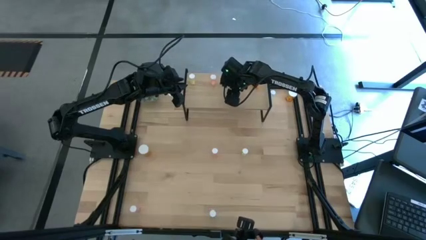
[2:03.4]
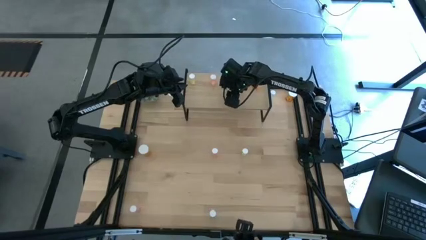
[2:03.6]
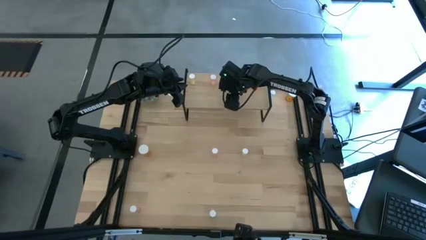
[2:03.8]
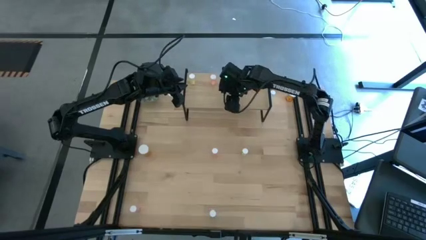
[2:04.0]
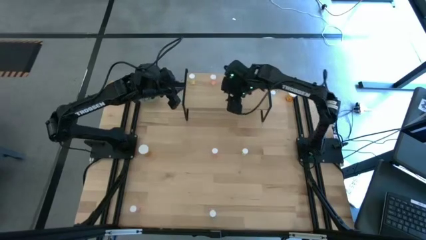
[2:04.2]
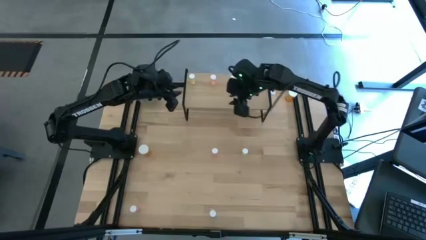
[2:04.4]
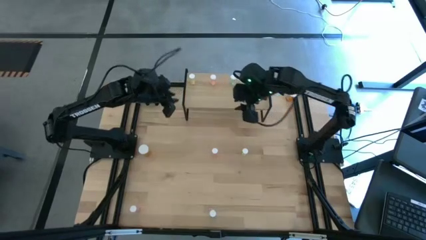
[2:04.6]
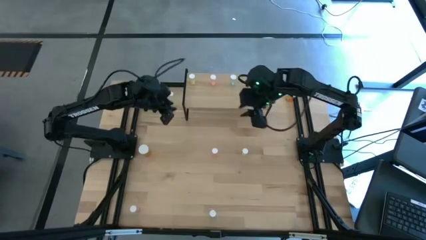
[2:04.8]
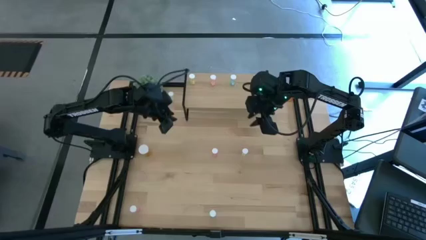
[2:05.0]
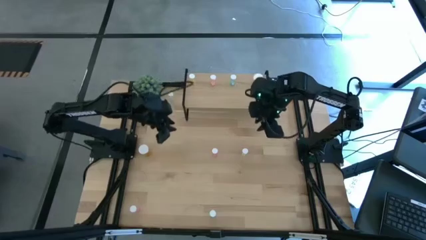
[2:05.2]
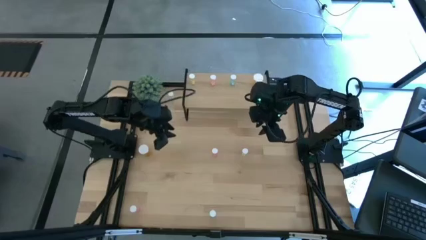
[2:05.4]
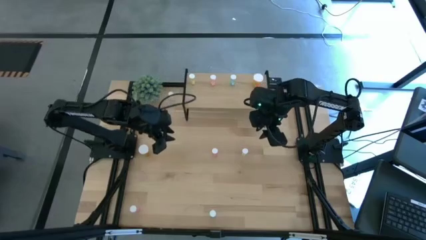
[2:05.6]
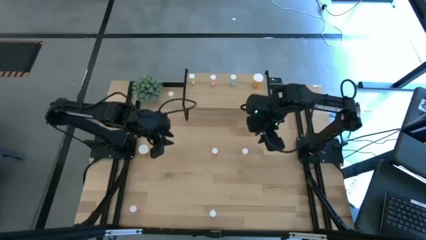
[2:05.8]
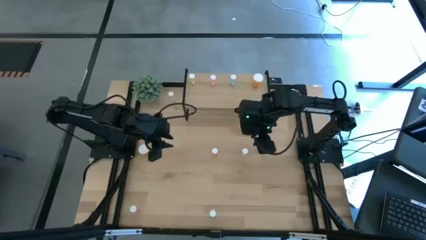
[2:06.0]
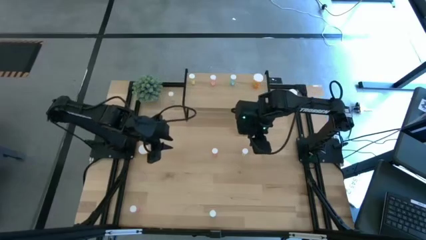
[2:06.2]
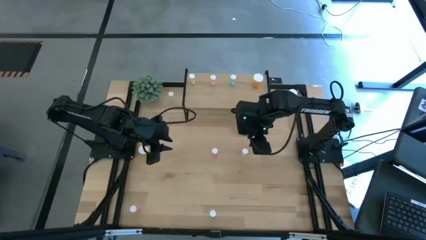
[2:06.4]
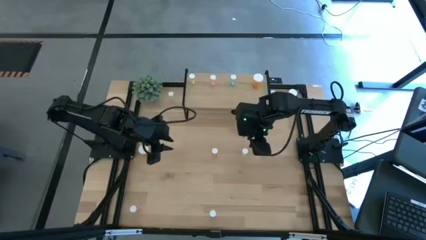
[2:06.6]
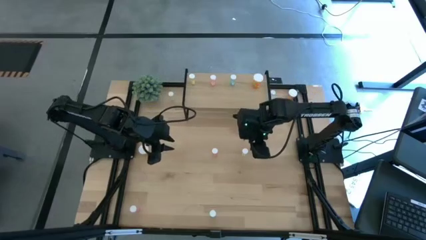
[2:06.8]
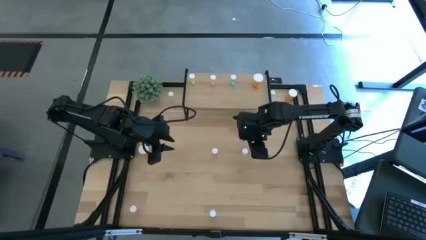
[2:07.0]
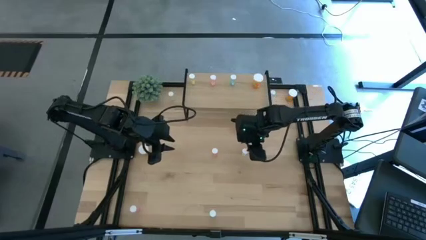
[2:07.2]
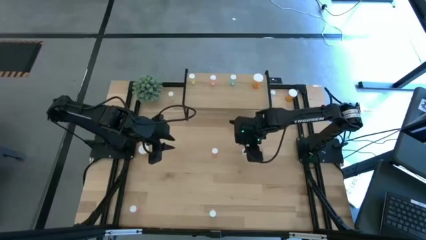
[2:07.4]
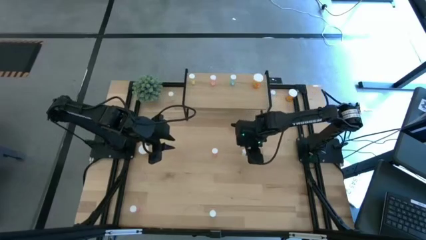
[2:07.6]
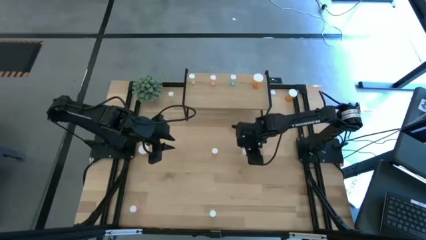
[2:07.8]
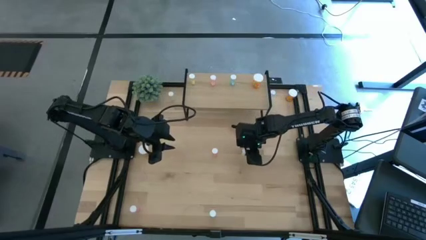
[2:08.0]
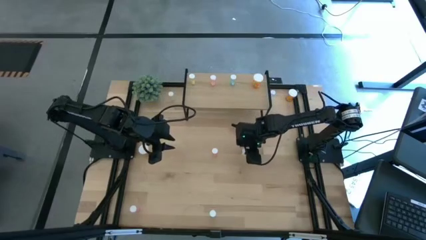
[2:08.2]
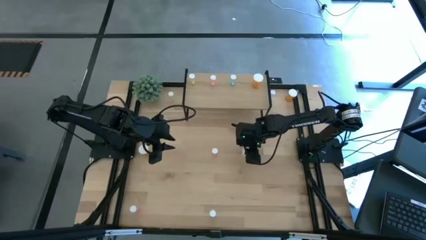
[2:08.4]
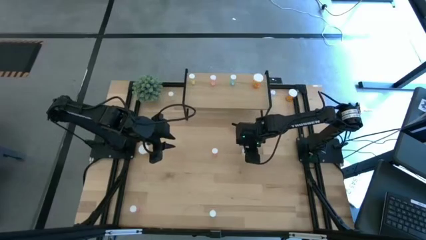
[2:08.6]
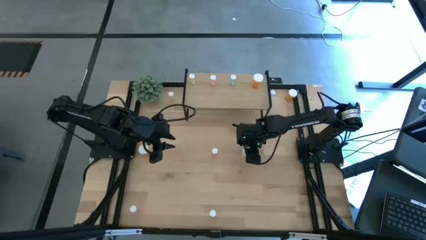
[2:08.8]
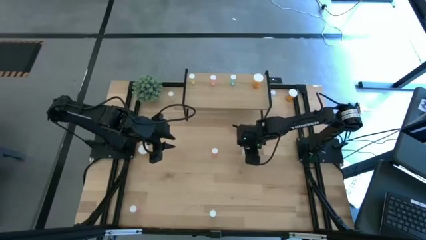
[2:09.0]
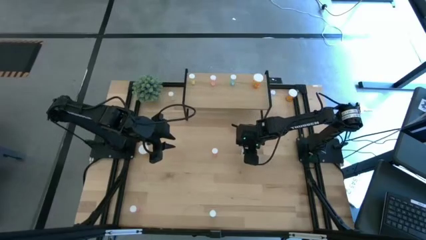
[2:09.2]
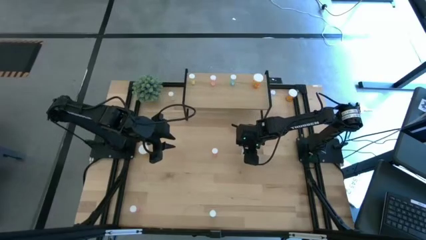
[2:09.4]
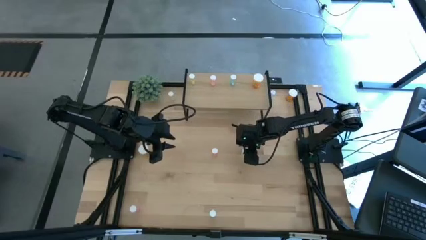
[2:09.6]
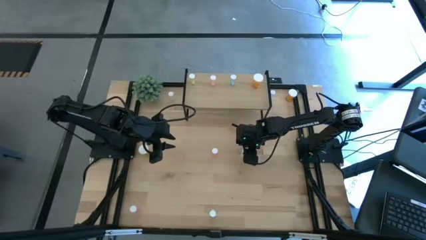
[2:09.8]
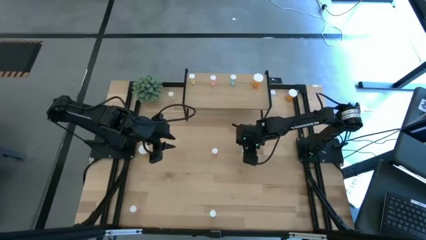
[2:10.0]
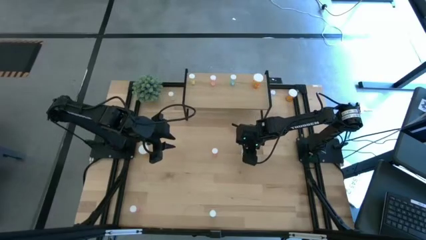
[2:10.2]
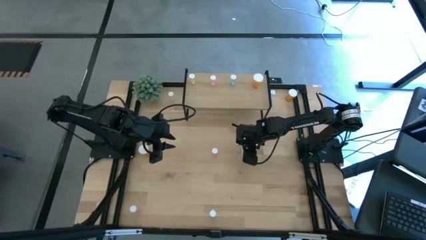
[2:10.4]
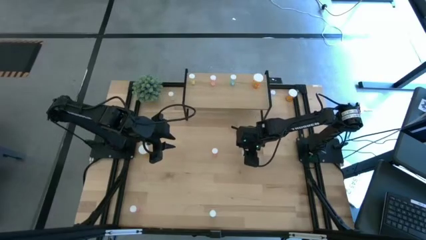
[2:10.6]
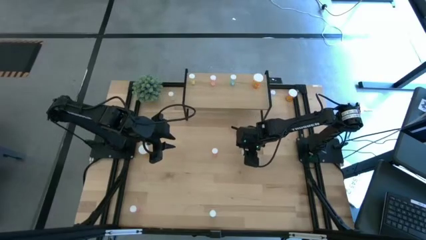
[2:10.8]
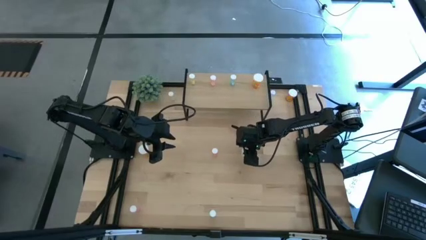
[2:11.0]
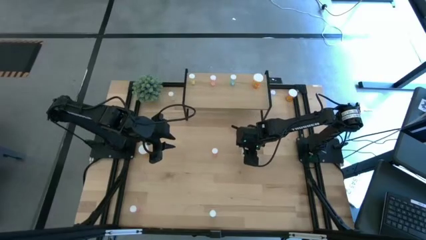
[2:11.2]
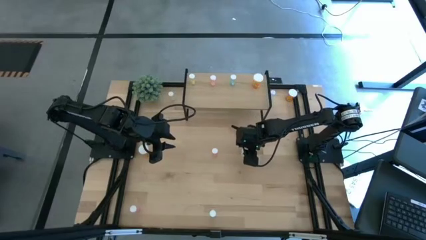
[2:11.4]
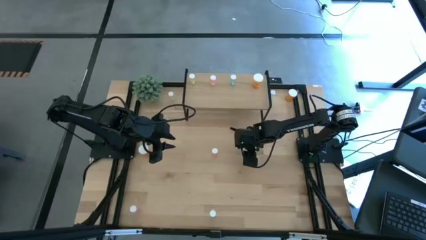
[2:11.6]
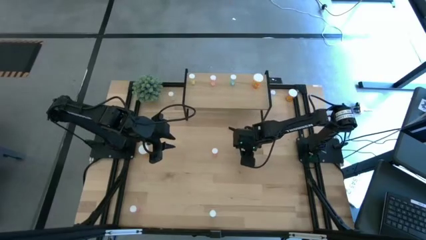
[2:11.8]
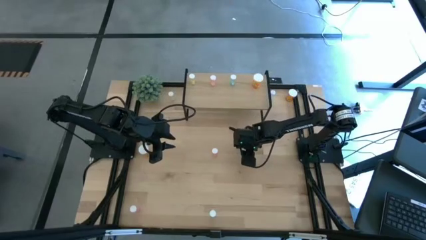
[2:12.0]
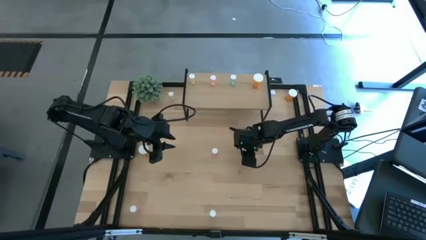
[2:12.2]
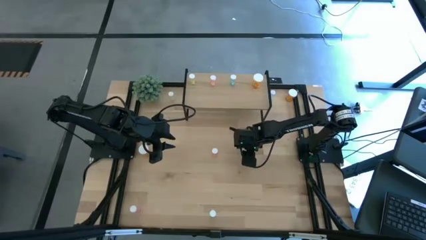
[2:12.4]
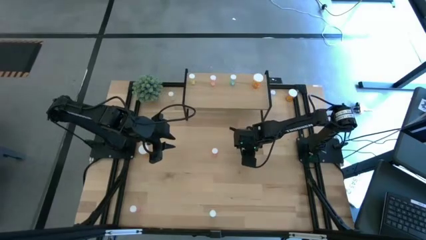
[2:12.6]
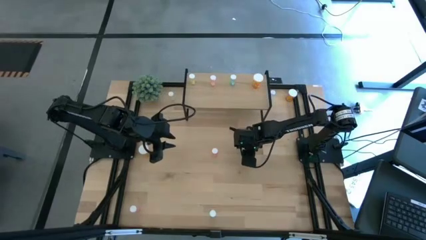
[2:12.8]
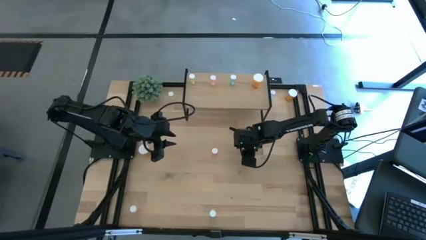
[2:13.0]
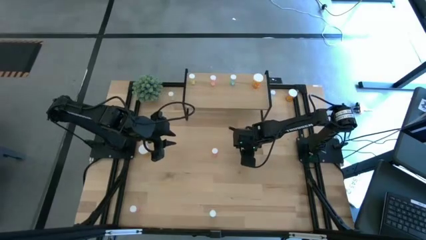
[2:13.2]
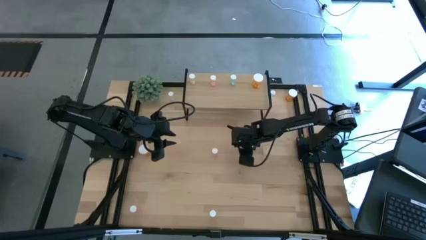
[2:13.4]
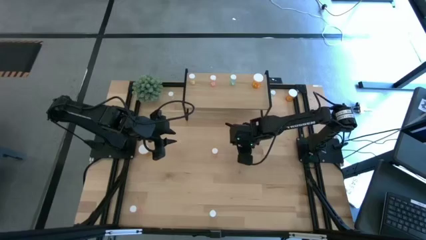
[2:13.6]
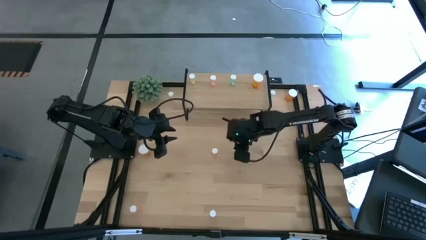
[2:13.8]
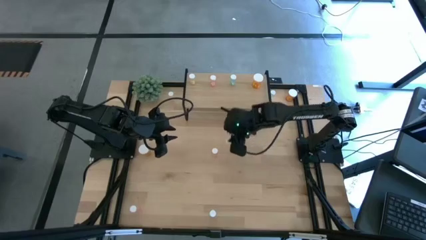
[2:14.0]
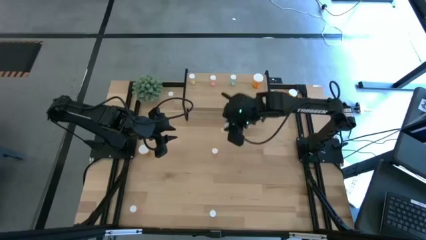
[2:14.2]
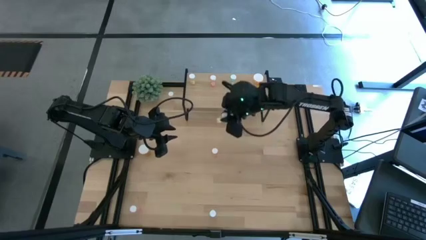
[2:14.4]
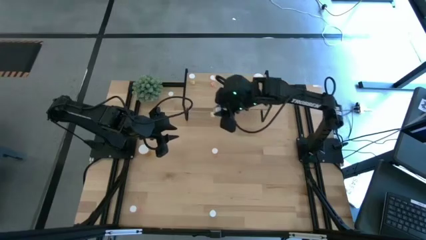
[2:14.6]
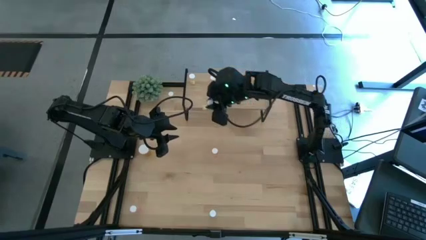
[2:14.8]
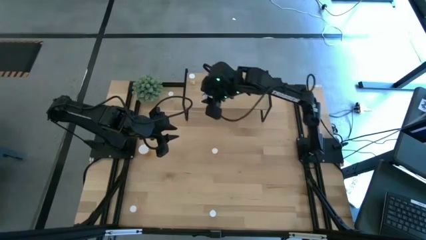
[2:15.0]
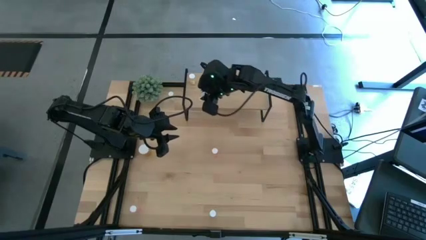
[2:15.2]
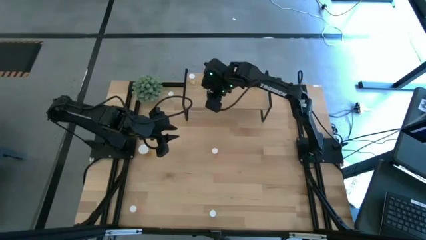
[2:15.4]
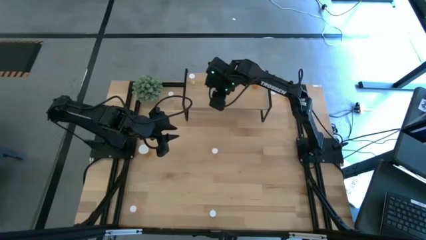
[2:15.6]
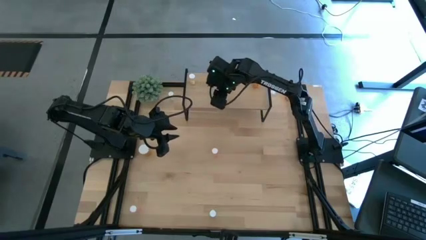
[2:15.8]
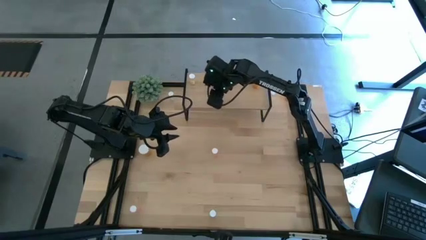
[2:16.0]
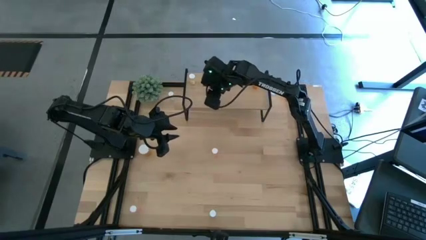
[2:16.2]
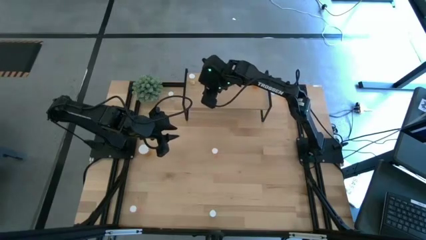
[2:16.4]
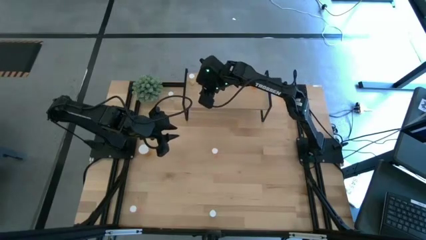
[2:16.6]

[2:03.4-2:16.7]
Task: Pick and place medicine bottles onto shelf by color
Put the bottom yellow pill bottle on the shelf aligned with the other yellow pill bottle

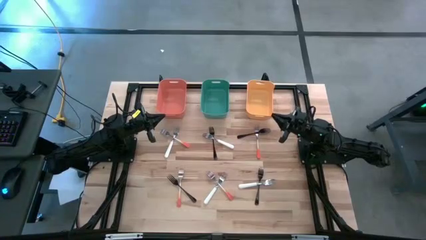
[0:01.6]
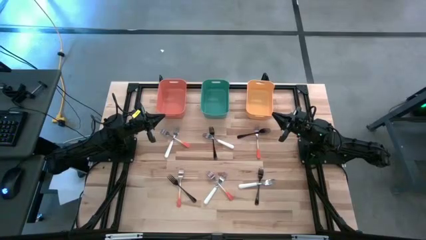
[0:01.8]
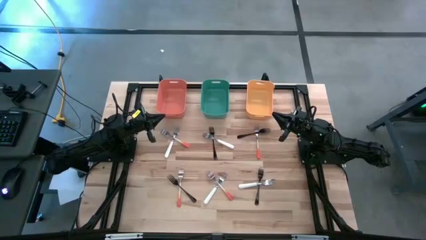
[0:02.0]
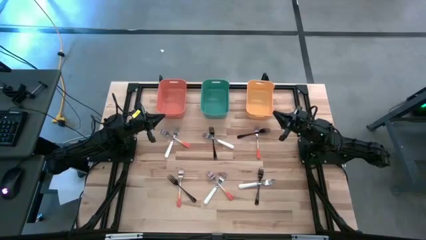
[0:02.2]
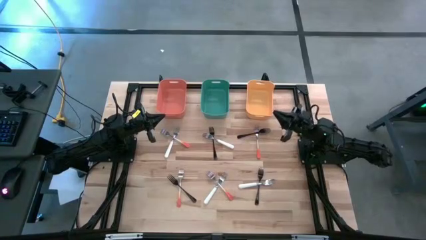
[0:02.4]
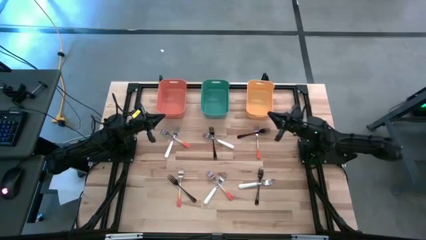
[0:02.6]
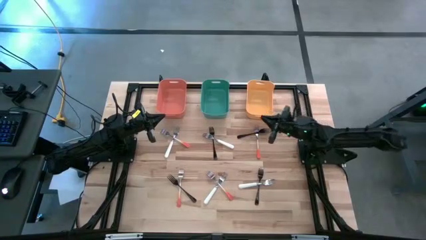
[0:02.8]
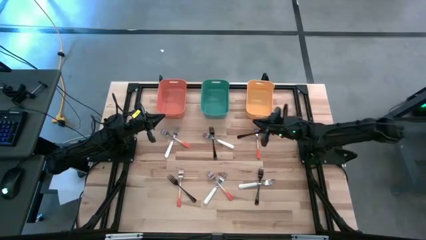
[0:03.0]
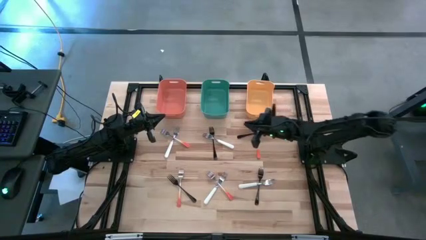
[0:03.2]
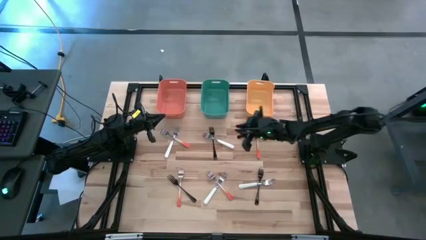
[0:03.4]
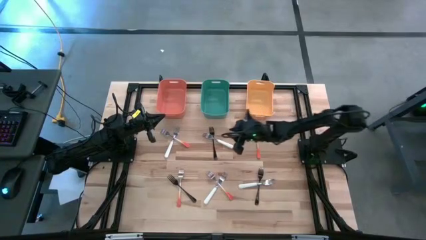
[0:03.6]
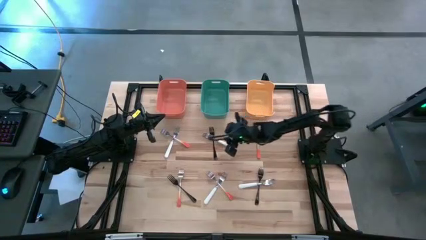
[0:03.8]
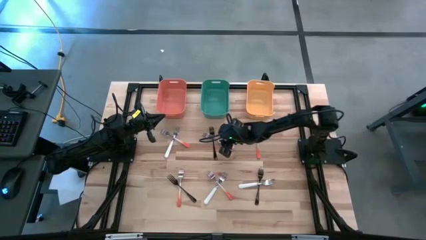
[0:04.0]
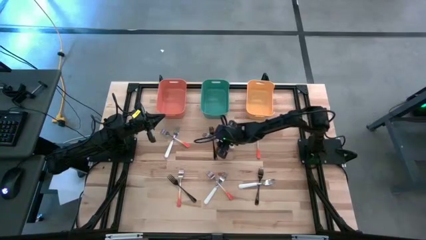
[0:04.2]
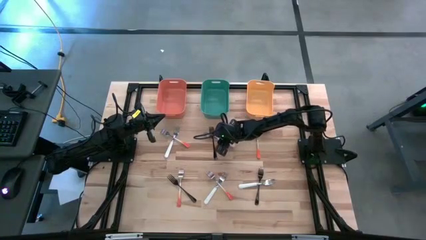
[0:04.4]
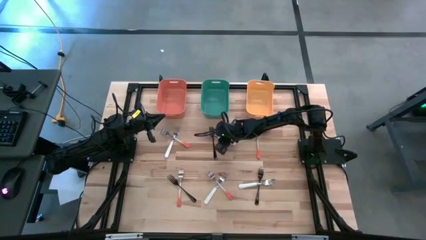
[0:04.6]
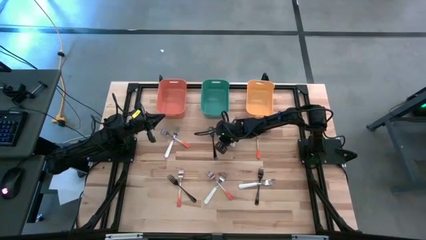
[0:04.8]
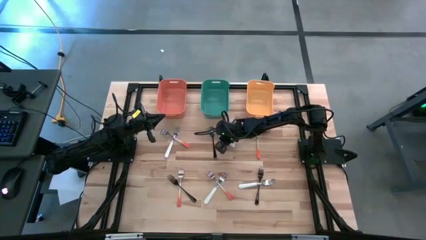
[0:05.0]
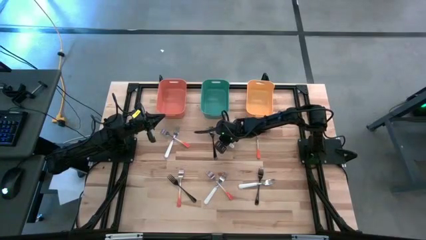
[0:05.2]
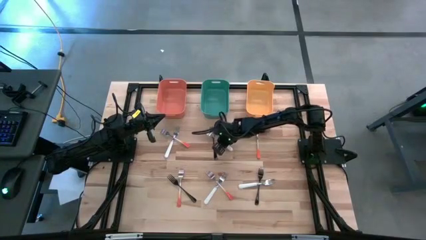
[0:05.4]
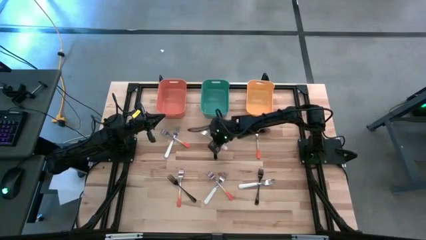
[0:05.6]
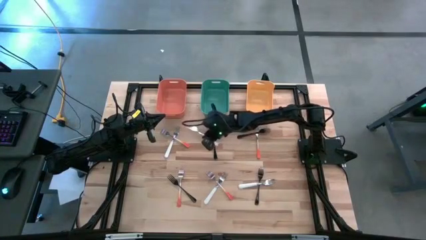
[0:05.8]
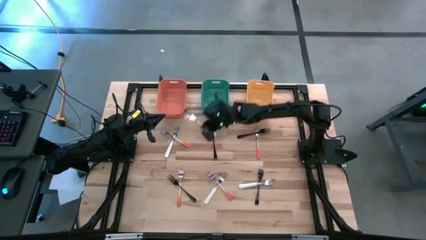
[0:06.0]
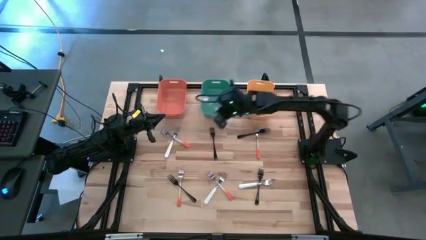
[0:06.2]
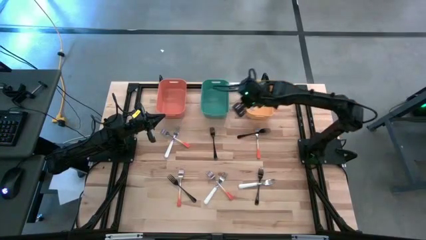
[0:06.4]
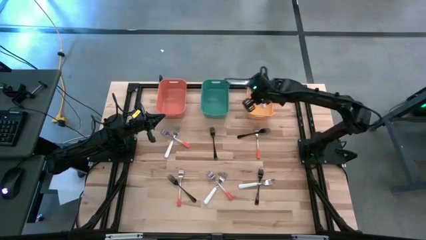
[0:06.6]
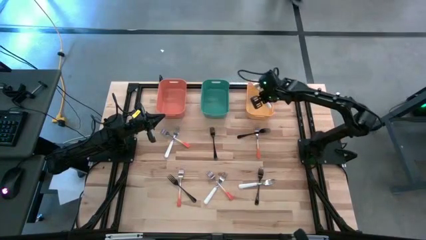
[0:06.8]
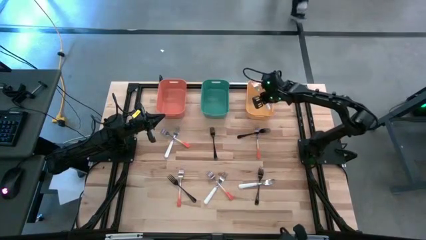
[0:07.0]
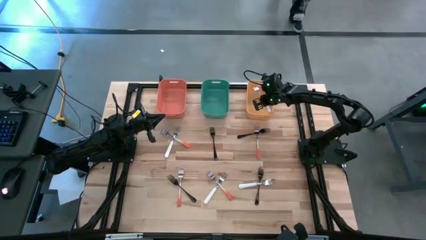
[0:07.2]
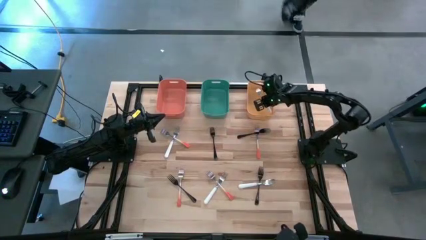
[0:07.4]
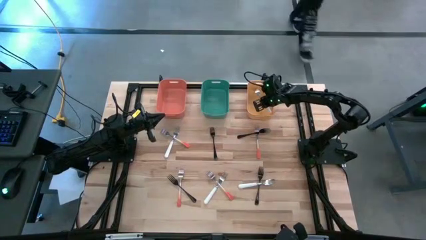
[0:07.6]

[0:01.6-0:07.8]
Task: Sort silverware by color (type)
Put the top right white fork into the yellow bin
